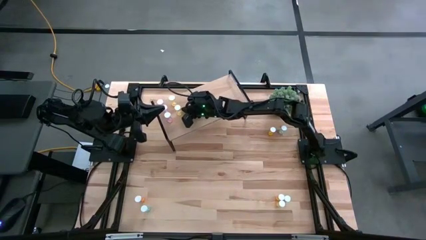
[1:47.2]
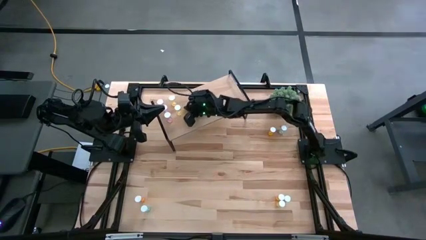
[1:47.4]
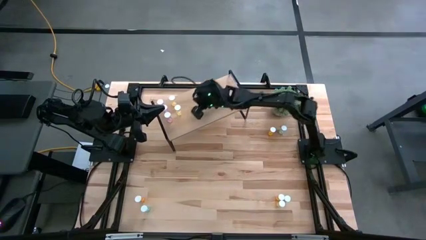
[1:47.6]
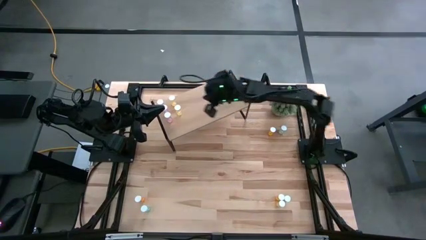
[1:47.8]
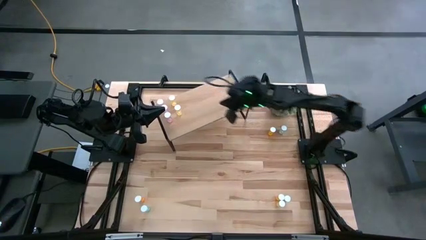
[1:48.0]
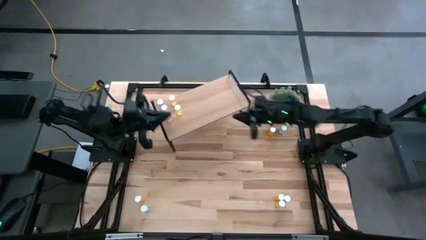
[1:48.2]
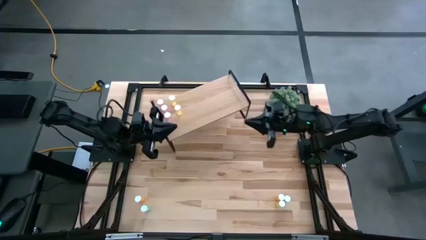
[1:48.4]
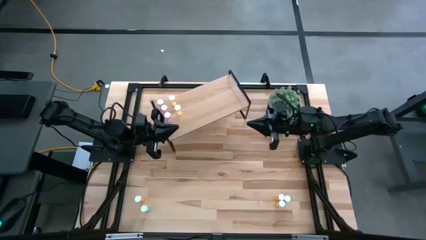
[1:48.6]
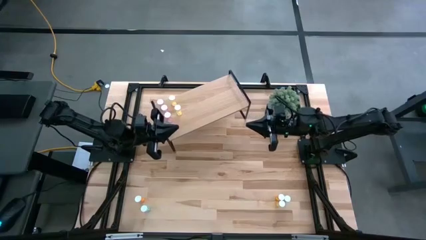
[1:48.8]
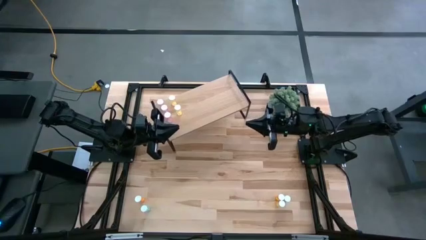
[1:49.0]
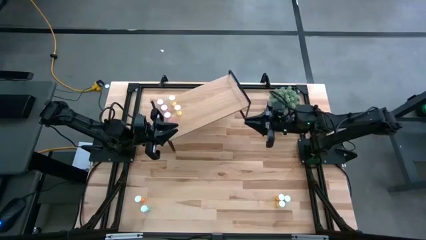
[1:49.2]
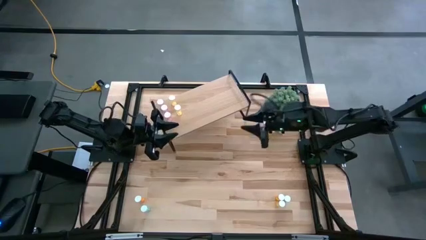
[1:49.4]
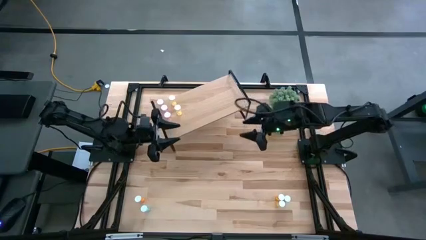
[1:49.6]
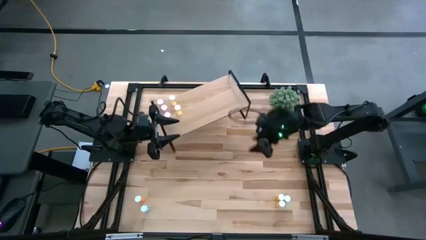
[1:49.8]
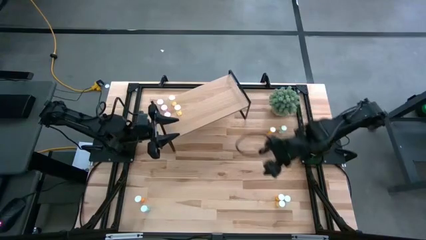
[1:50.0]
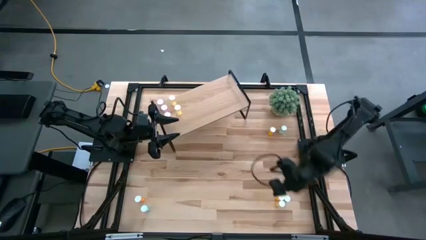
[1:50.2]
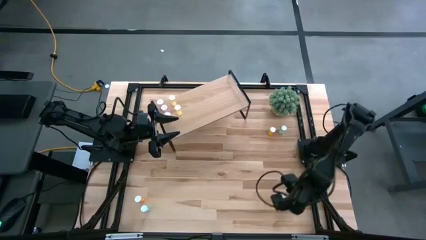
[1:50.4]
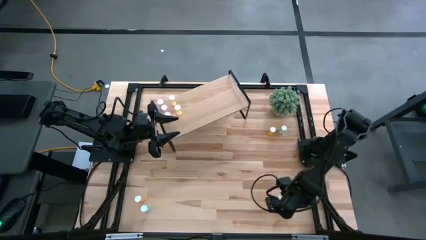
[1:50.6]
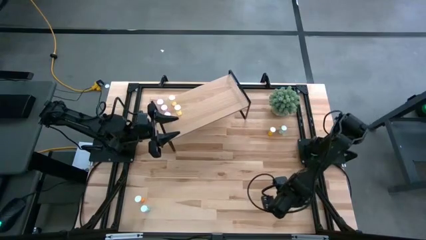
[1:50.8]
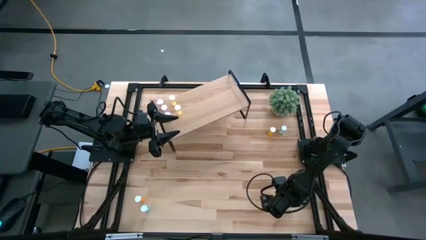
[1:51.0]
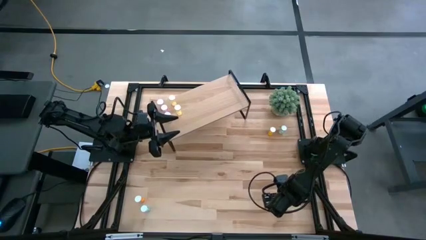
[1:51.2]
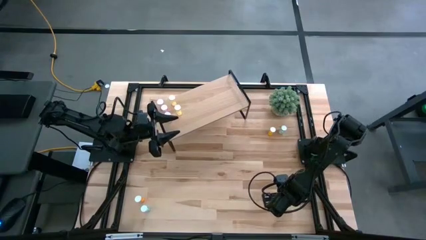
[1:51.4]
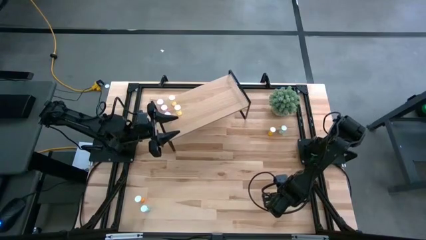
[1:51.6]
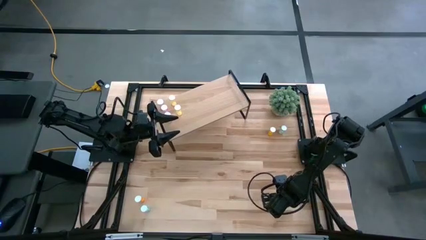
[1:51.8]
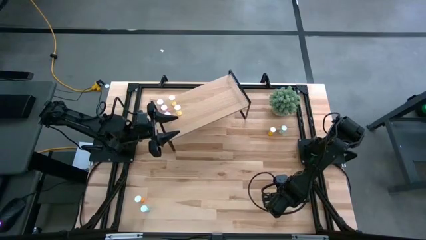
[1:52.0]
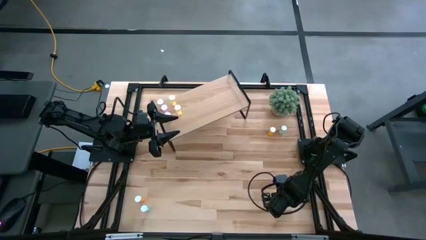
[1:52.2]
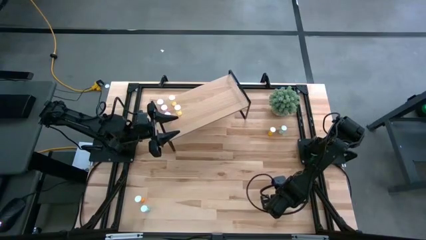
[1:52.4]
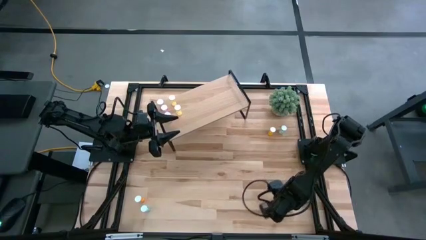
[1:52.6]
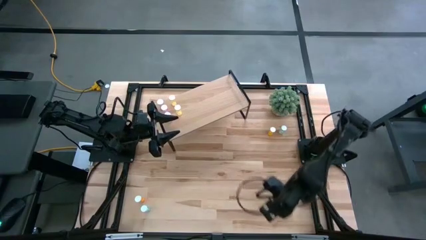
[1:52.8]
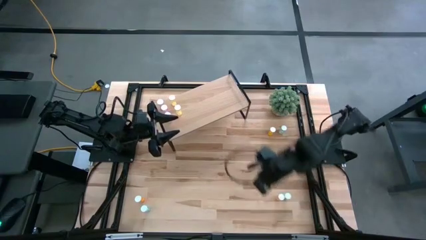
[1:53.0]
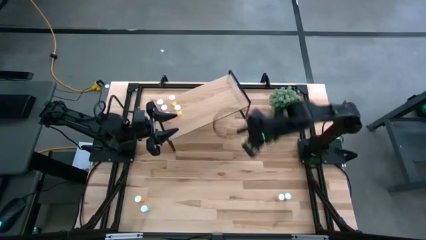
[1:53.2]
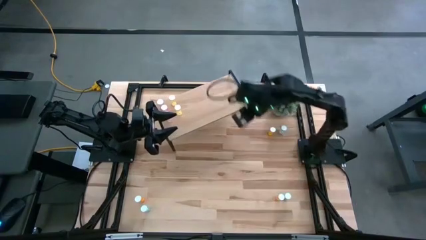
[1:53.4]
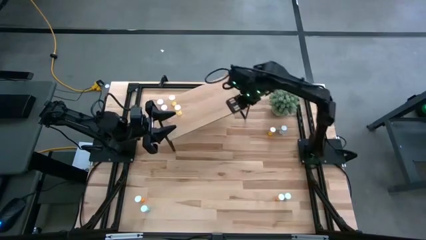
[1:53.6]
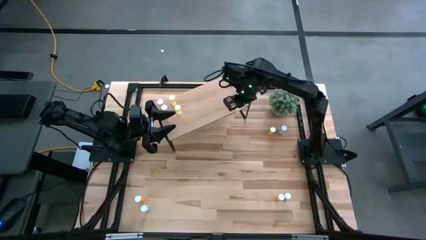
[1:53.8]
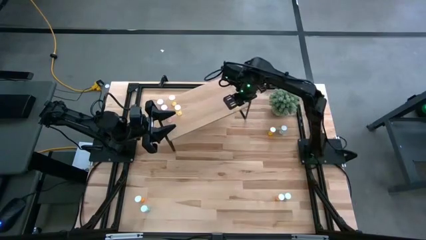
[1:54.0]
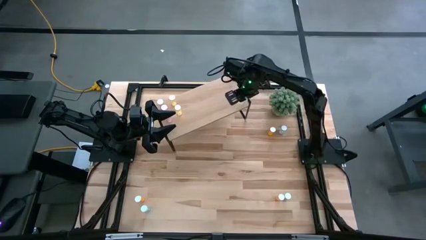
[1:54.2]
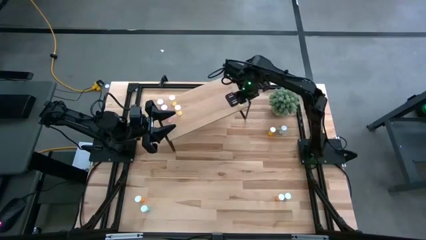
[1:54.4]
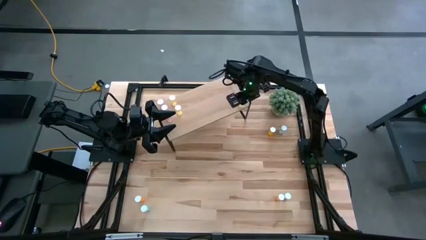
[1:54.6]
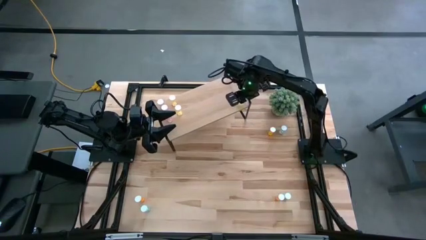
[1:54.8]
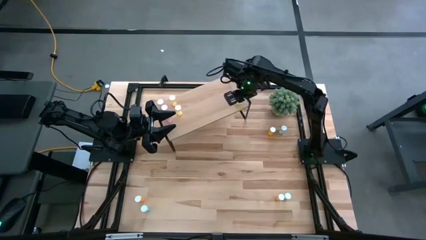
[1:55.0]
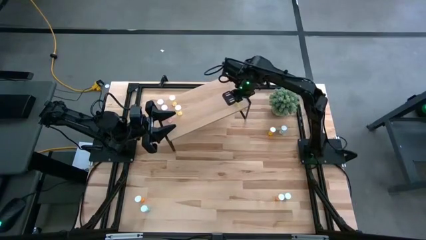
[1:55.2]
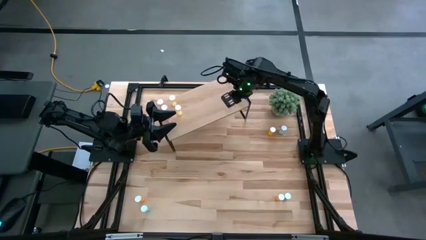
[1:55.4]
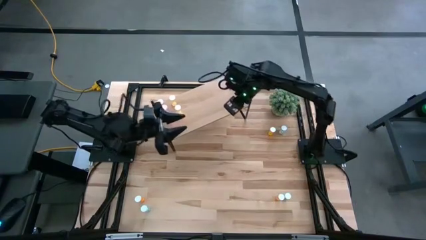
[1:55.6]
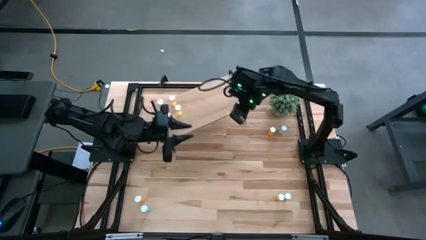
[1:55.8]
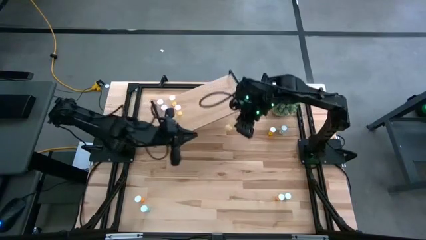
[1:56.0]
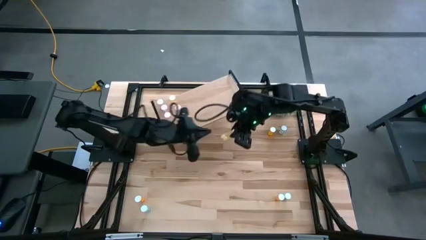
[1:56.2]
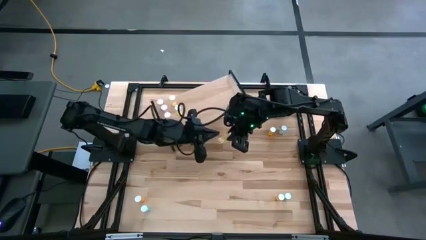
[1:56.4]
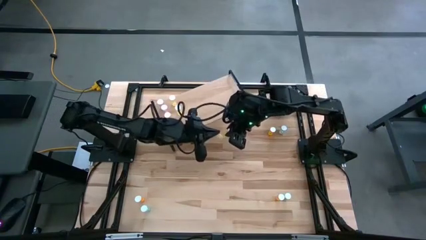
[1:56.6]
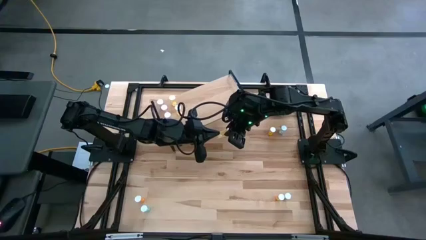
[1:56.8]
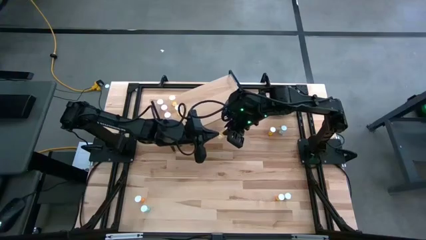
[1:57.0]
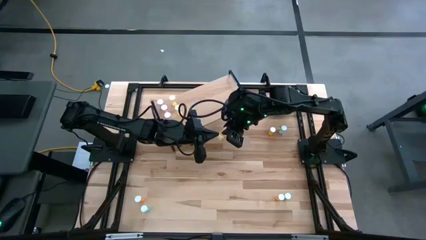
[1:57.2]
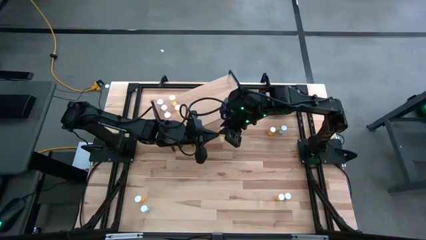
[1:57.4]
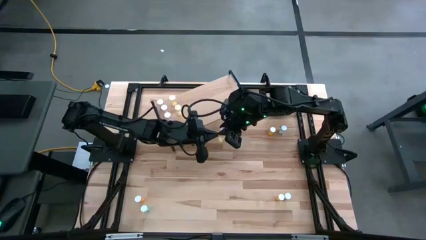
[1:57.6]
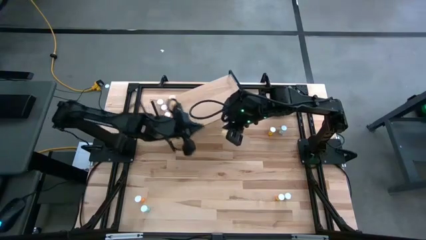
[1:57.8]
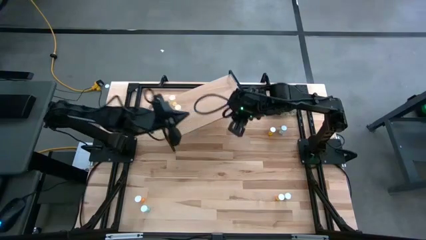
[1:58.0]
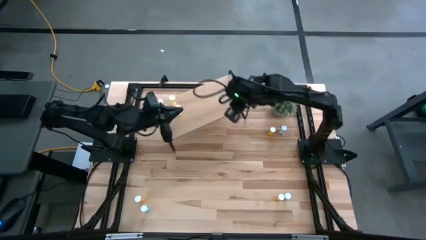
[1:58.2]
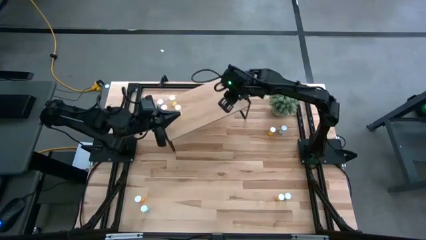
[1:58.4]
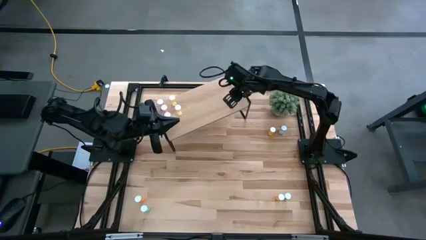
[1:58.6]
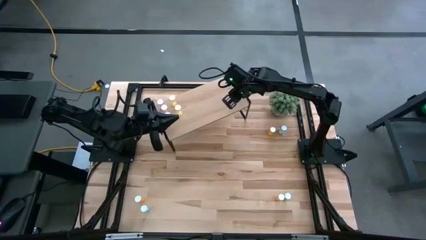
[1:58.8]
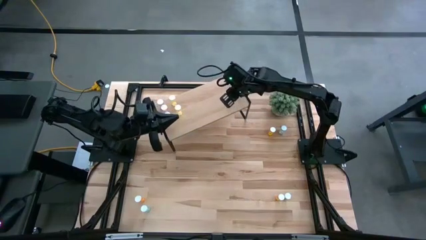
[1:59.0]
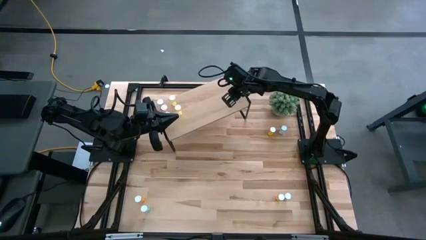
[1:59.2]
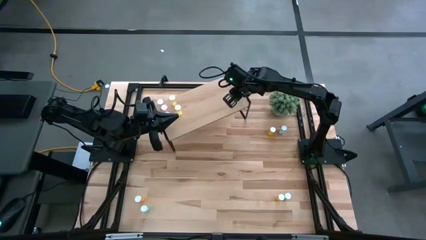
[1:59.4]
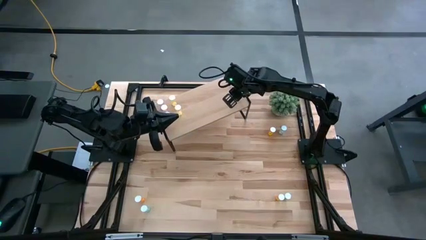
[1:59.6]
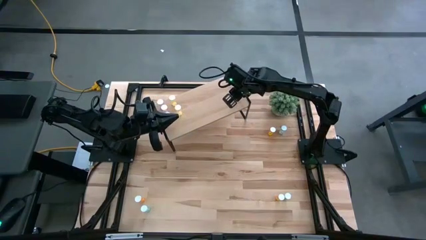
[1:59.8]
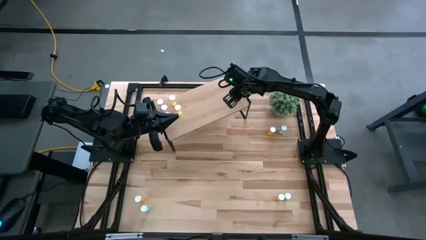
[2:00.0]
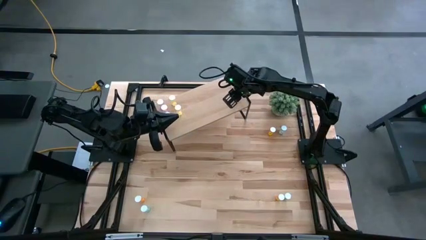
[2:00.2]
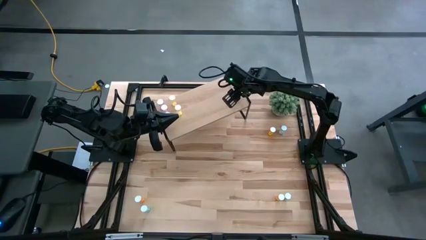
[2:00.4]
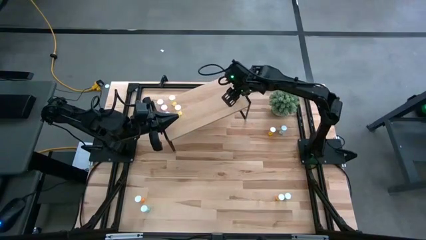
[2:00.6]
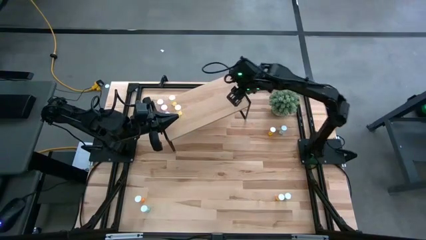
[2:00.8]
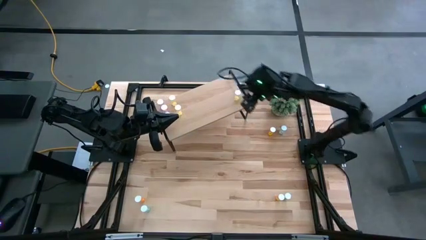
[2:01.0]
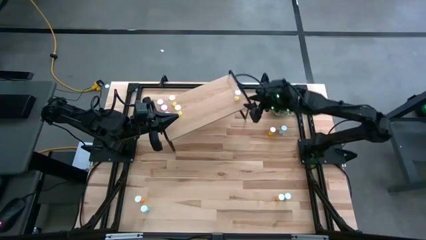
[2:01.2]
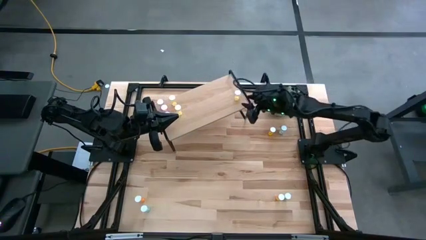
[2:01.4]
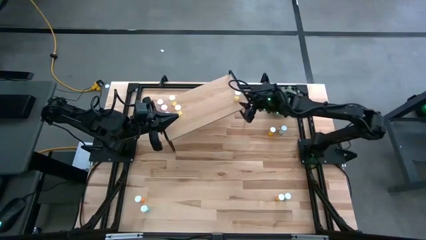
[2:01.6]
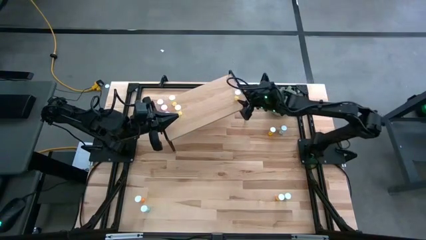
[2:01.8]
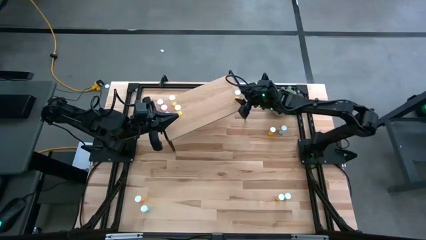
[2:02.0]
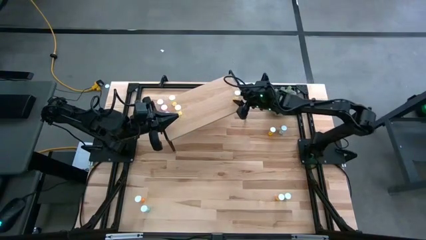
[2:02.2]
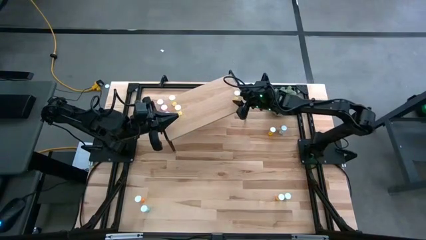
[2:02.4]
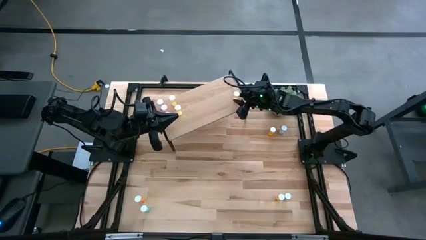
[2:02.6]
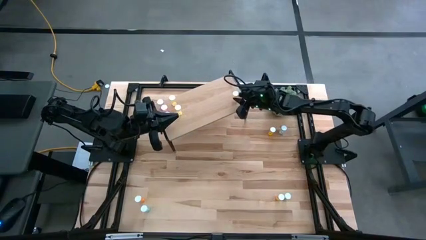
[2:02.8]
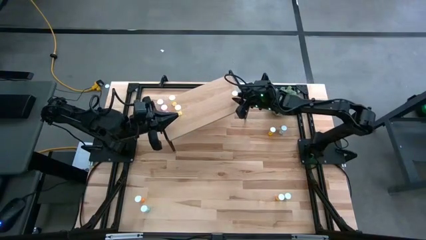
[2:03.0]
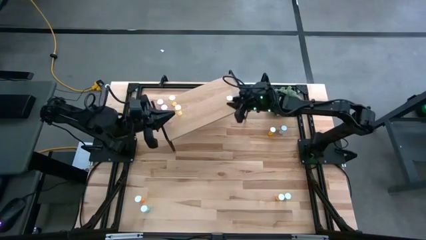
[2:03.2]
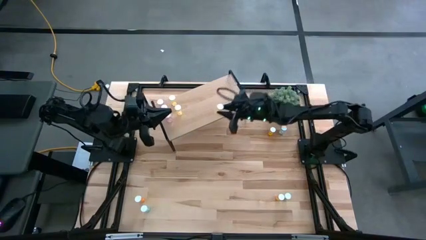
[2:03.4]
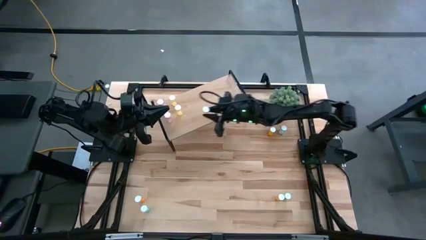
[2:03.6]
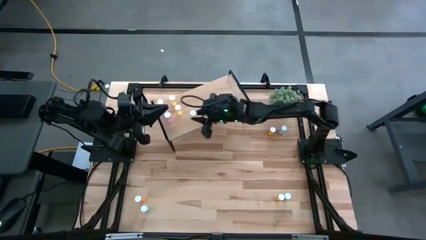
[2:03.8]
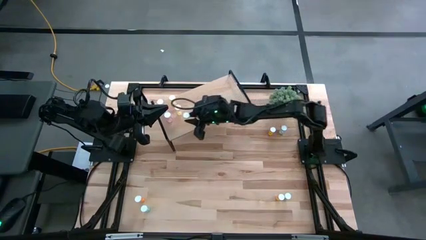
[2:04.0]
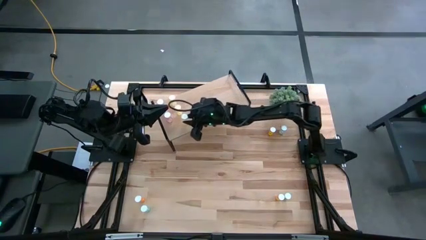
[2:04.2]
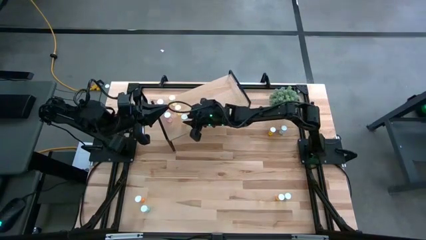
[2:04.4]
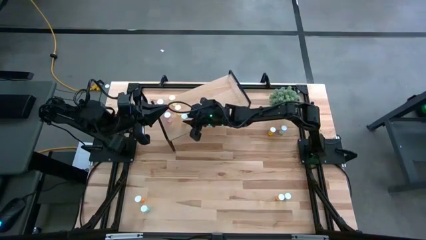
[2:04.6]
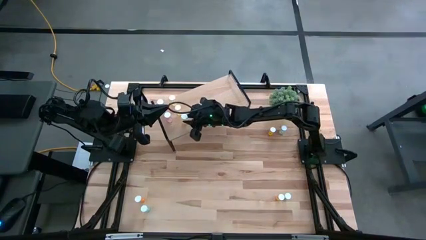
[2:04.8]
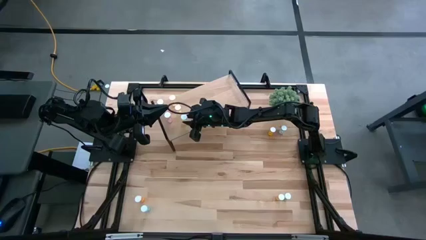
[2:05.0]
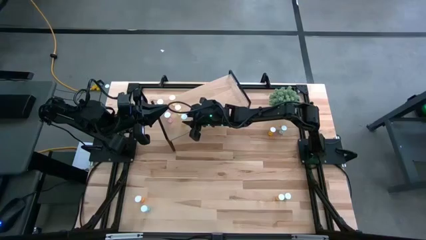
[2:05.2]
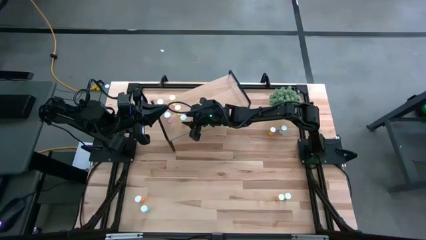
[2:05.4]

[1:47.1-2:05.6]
Task: Pick and place medicine bottles onto shelf by color
Put the yellow pill bottle on the shelf aligned with the other yellow pill bottles
